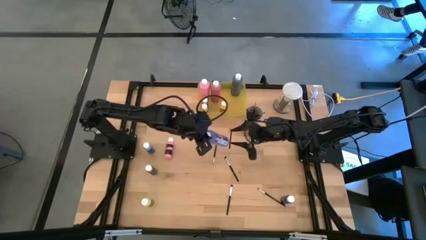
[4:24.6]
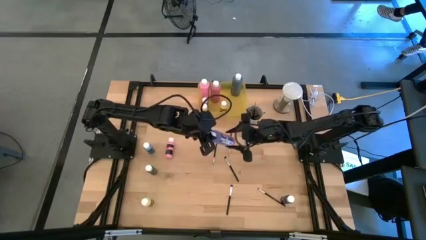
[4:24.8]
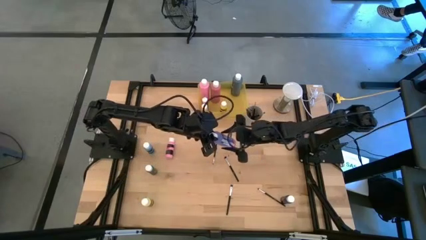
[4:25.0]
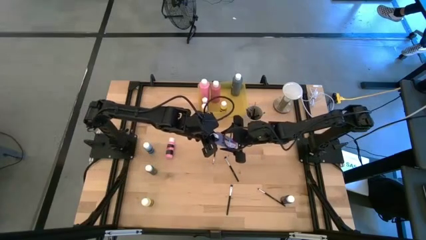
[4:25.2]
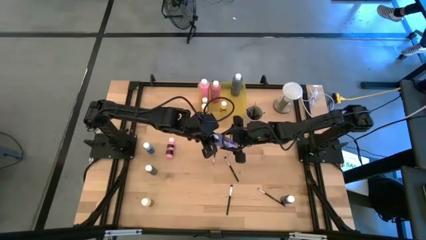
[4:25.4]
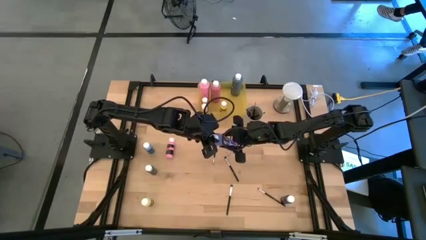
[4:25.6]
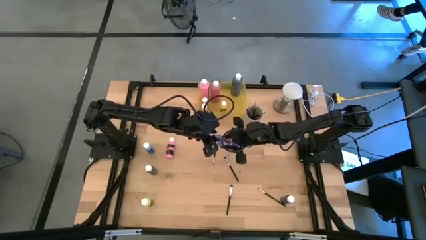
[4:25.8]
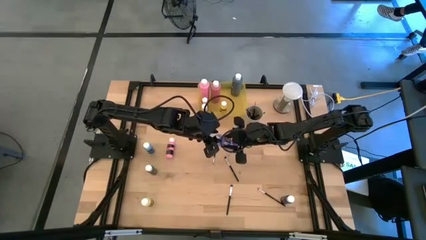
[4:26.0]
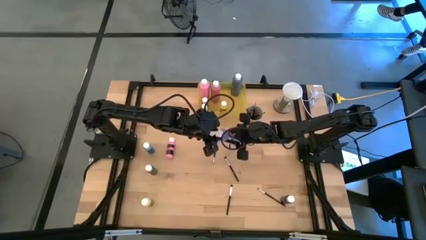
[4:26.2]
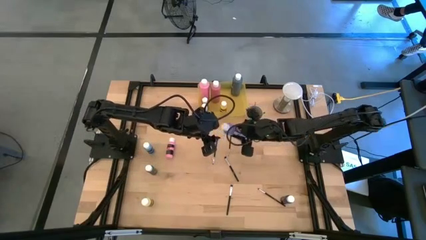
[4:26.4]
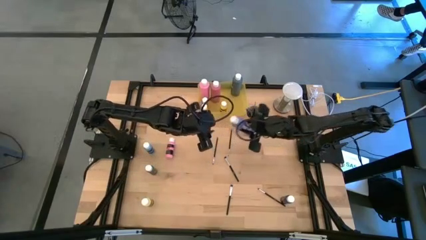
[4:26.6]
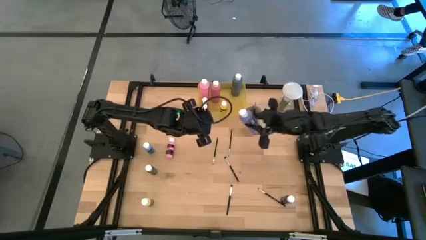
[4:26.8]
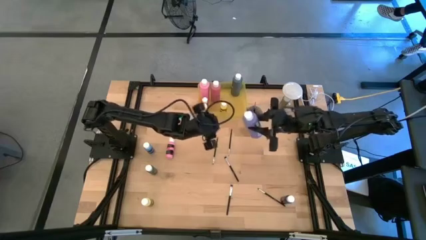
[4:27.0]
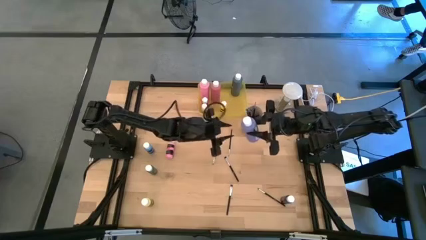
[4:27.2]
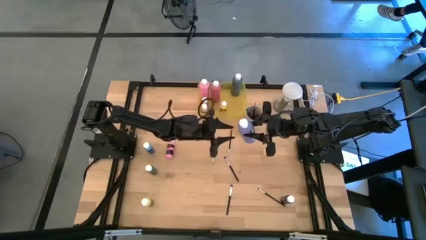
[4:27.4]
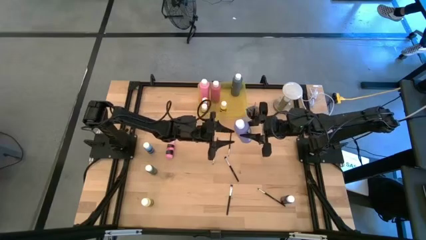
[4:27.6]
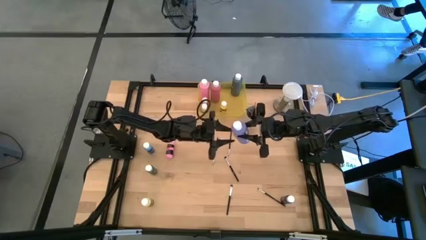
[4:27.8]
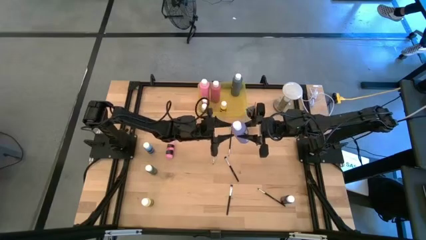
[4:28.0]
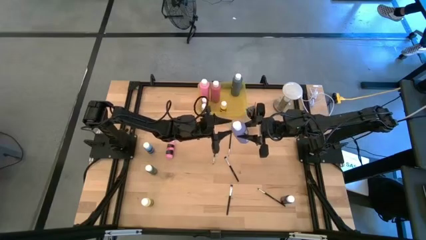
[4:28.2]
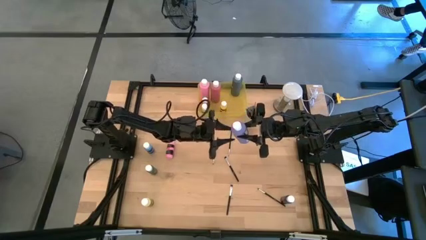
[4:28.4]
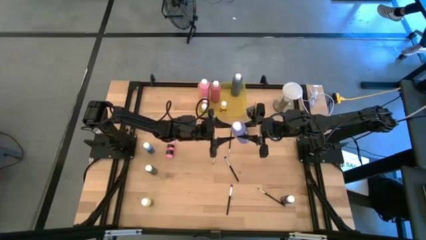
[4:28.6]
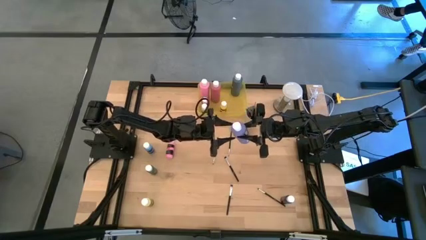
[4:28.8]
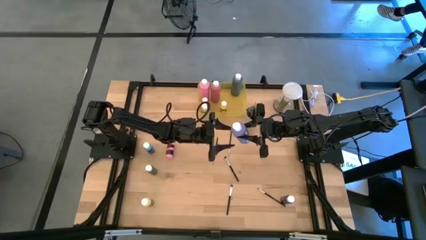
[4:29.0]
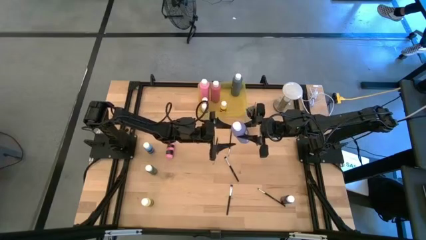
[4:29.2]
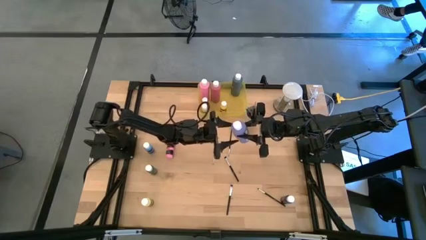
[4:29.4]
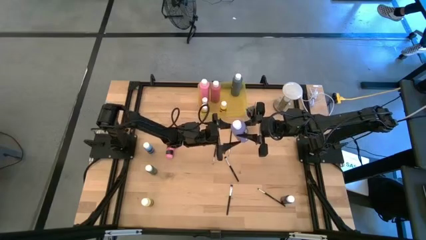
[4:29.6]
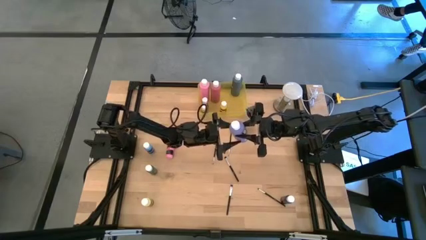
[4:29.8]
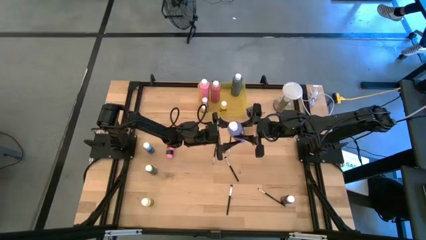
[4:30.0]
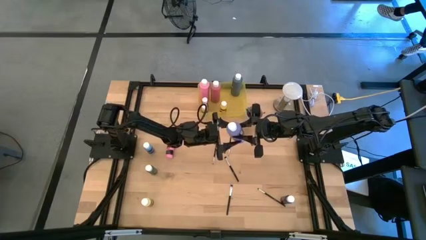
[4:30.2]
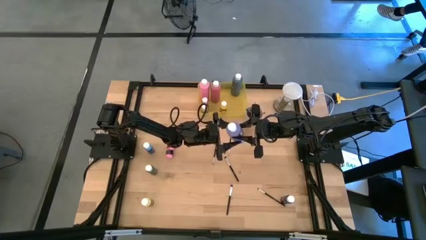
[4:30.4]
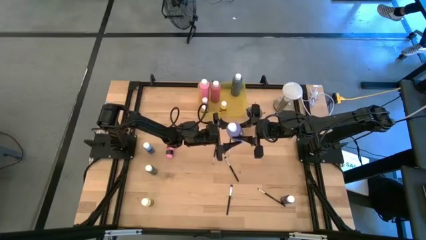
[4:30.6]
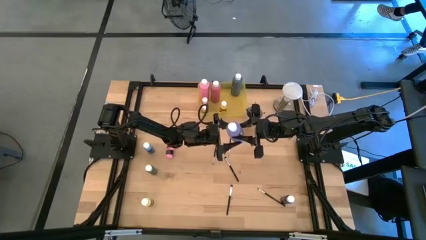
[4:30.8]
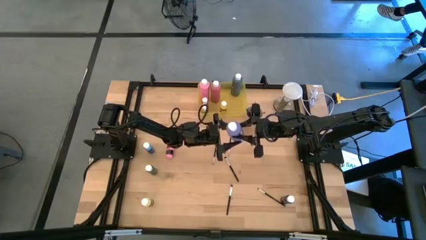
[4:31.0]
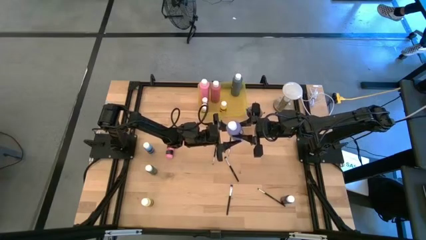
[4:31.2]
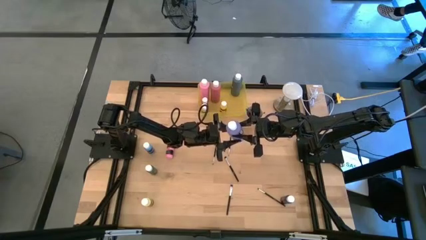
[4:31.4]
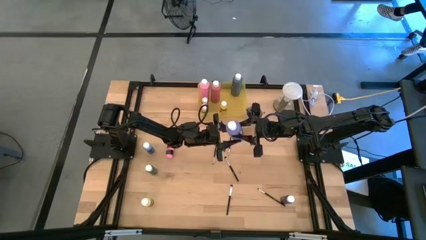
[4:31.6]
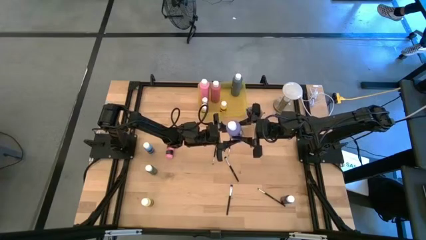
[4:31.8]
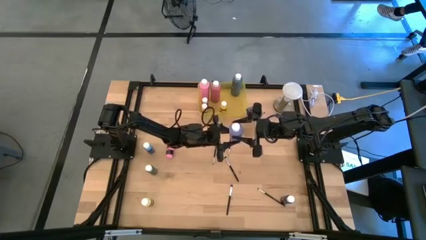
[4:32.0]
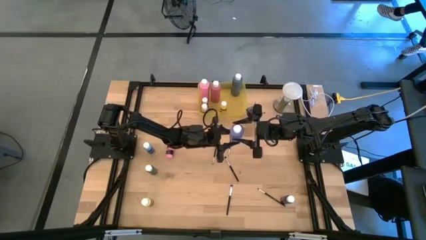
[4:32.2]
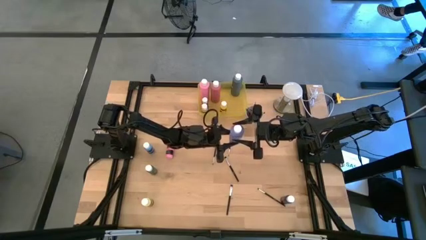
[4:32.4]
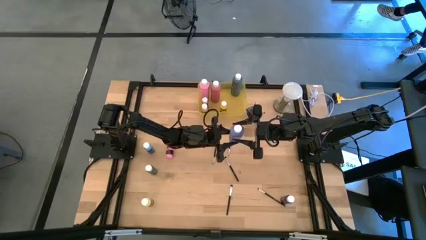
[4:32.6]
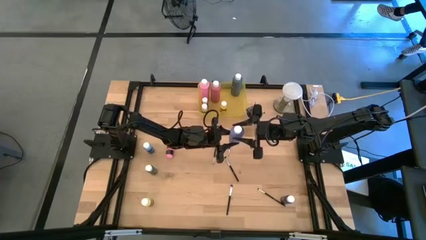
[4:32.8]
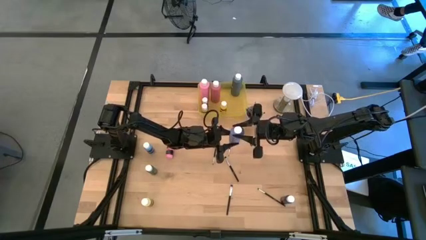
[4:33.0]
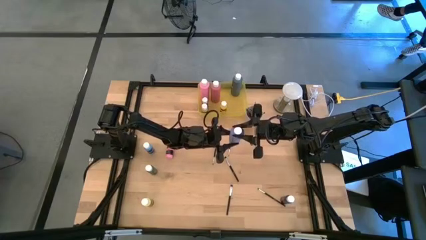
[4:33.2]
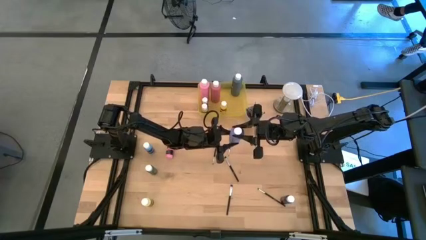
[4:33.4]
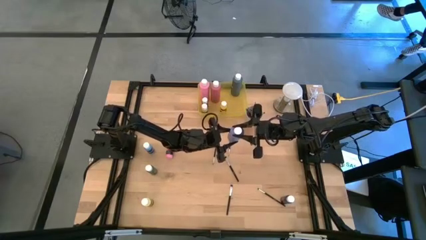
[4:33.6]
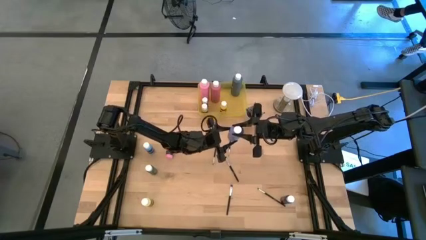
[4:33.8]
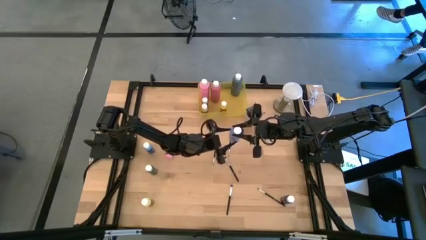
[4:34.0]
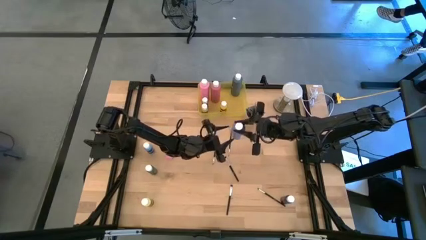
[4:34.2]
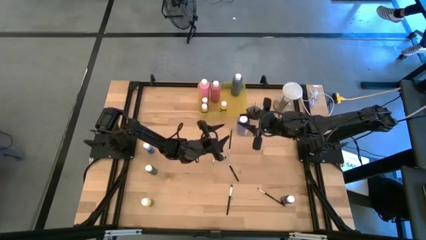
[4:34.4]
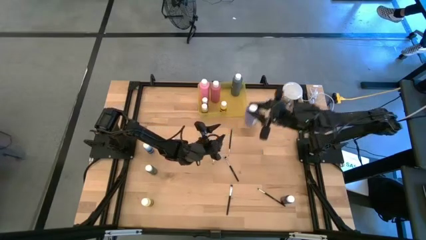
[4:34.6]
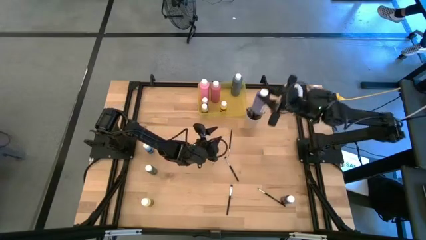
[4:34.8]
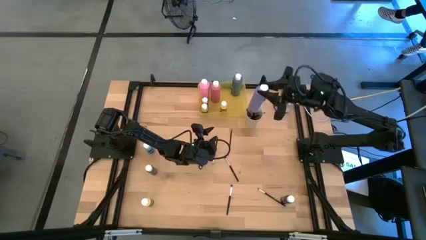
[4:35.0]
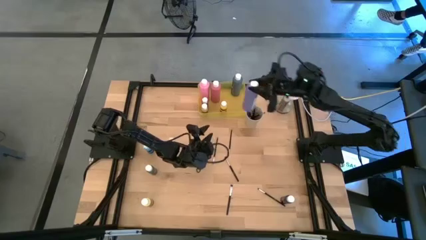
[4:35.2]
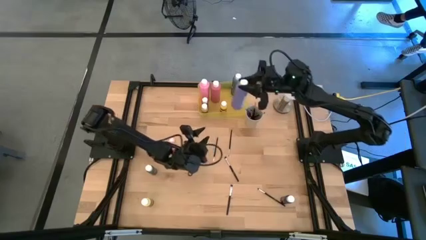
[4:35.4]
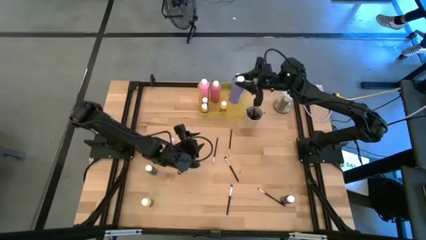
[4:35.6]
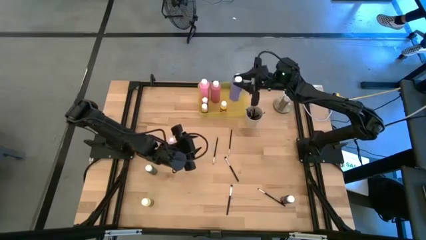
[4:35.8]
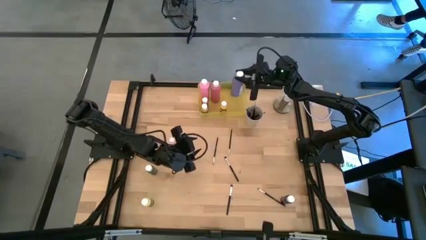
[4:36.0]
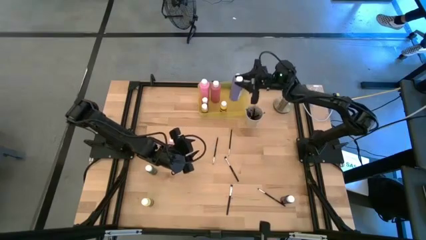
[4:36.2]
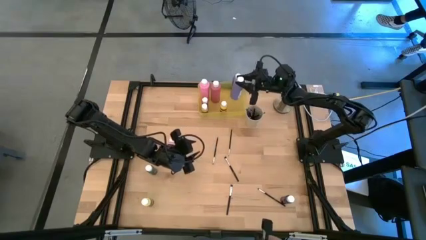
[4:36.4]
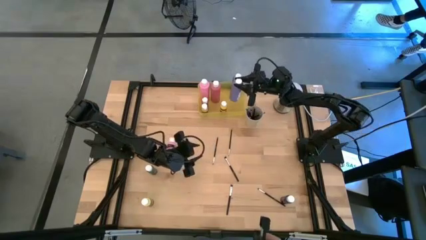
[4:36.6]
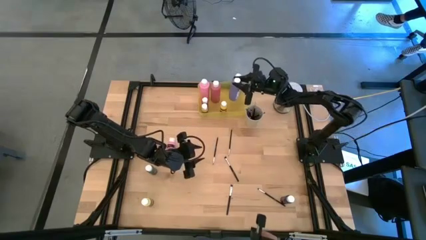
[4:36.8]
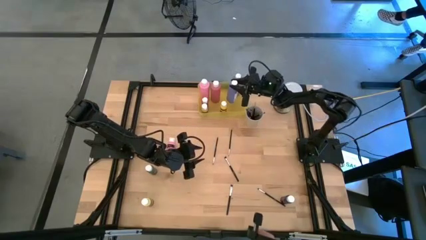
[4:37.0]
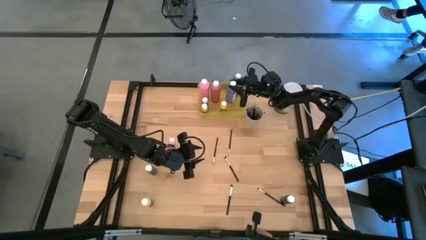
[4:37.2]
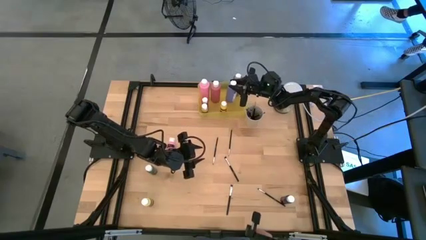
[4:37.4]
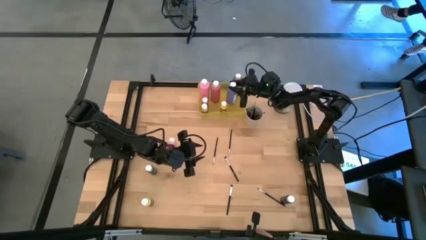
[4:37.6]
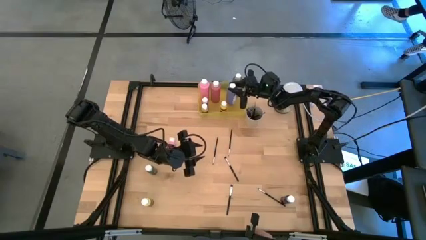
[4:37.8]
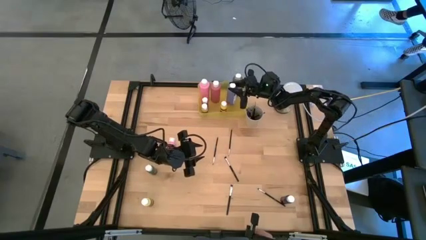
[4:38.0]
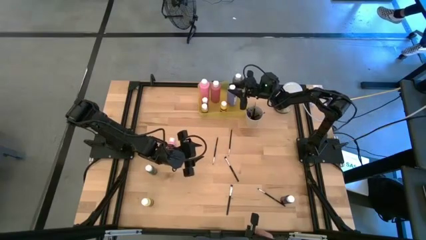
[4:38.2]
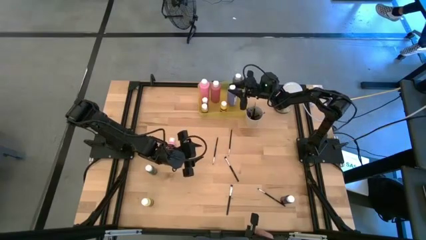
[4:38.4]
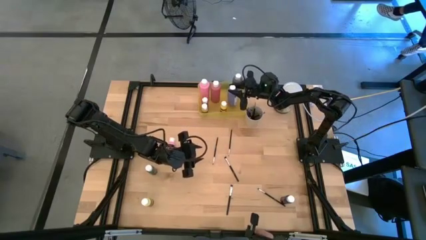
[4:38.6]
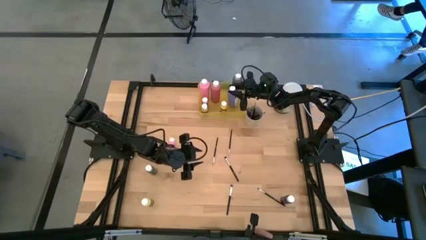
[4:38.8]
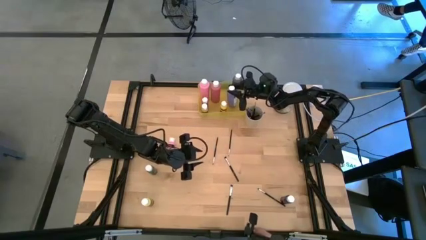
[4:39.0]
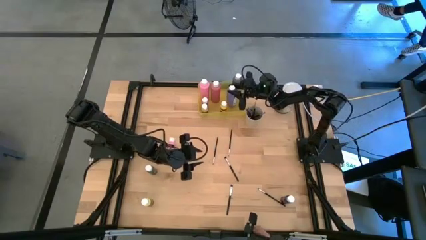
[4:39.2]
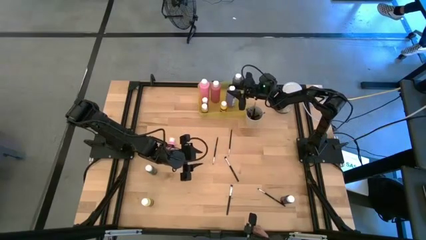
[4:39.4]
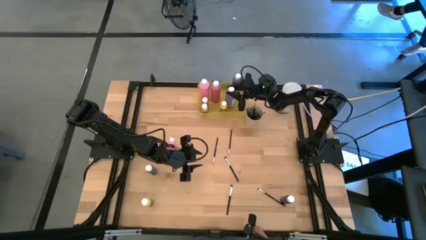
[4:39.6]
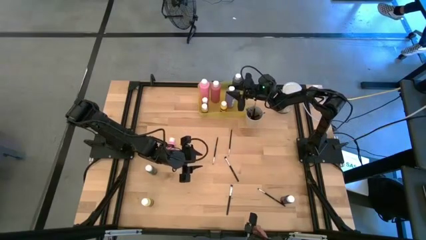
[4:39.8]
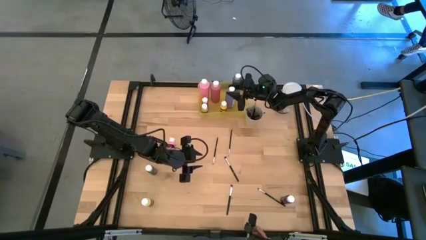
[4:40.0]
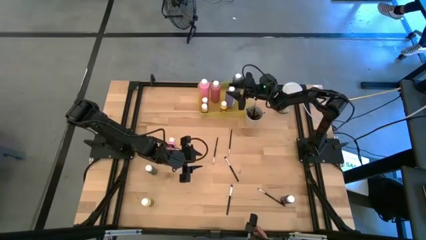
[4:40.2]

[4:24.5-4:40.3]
Task: Pick & Place Paint Supplies
Put the large blue paint bottle into the yellow bin
